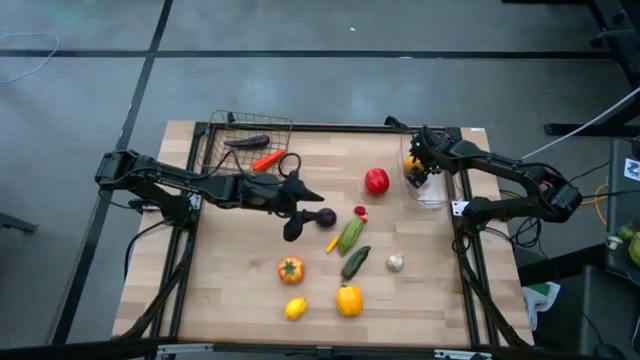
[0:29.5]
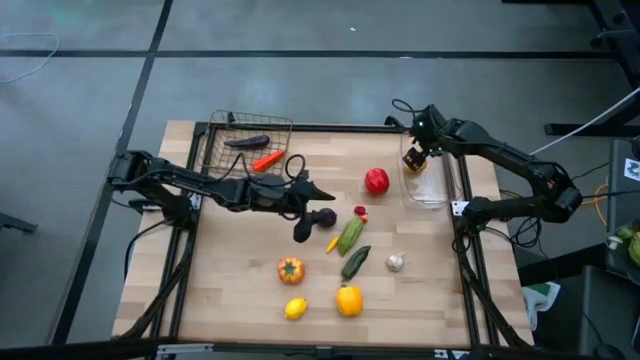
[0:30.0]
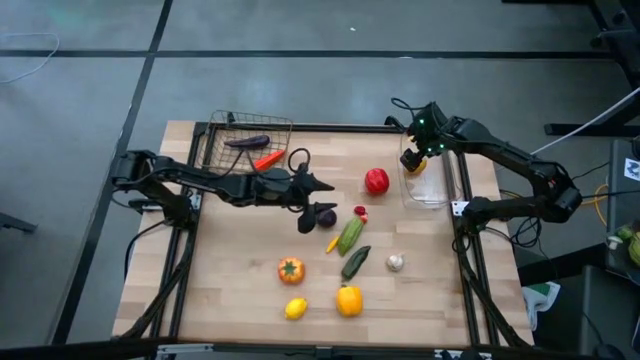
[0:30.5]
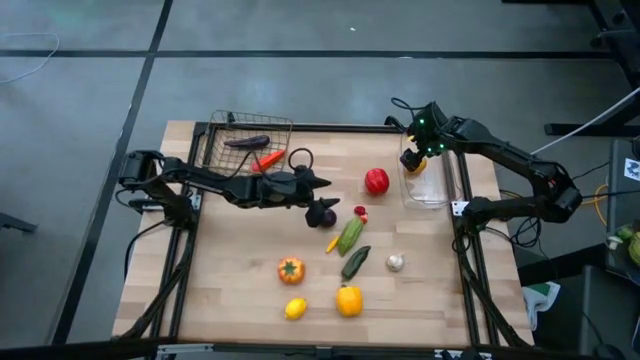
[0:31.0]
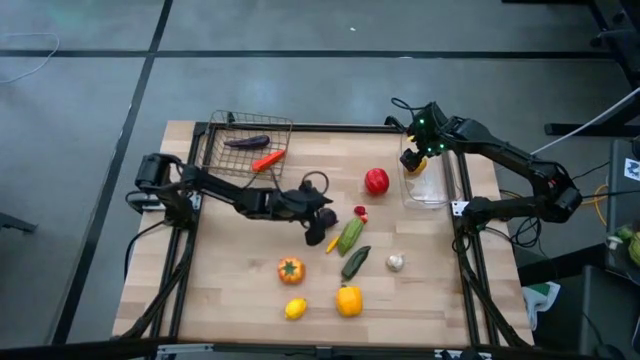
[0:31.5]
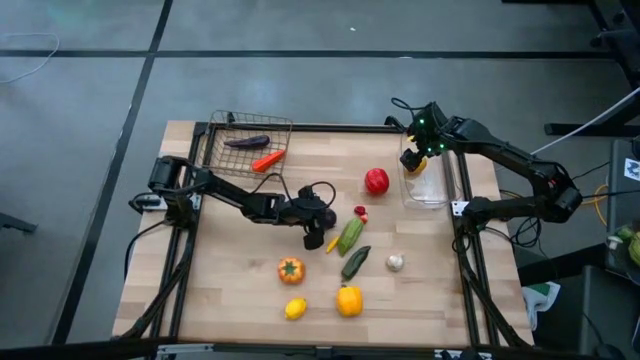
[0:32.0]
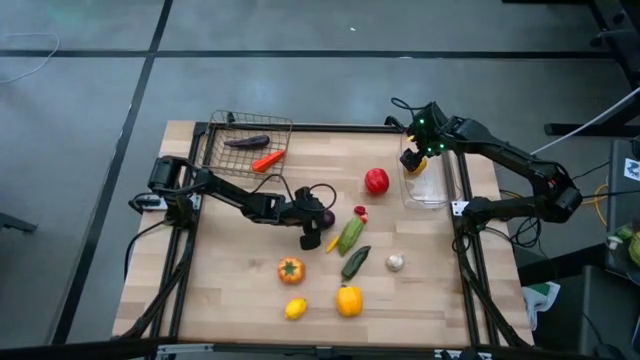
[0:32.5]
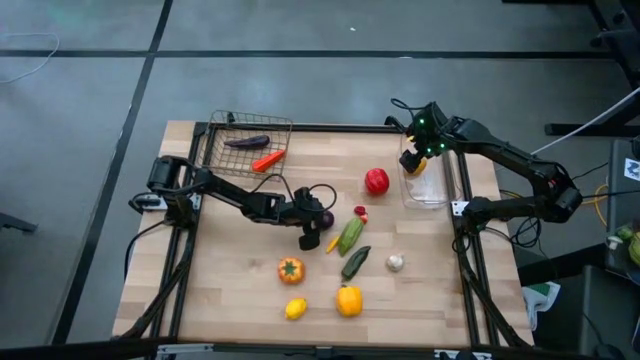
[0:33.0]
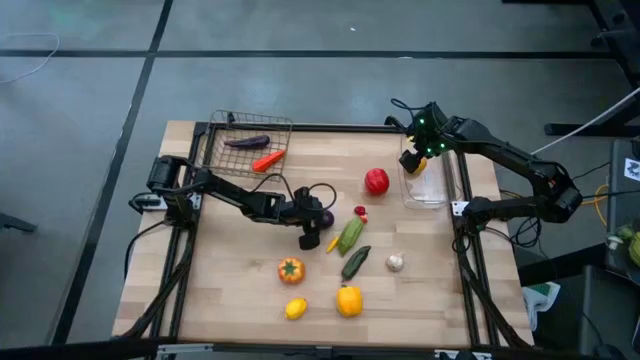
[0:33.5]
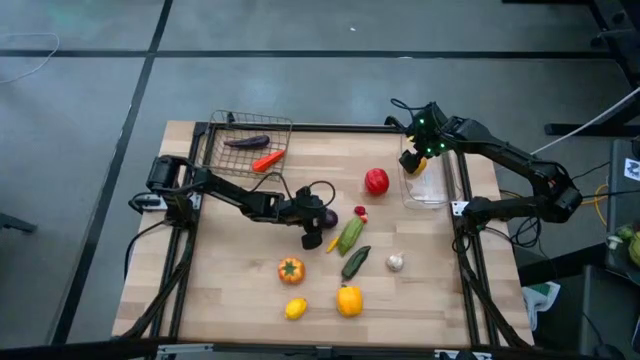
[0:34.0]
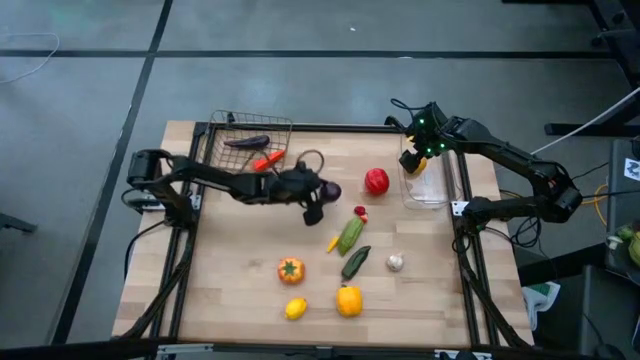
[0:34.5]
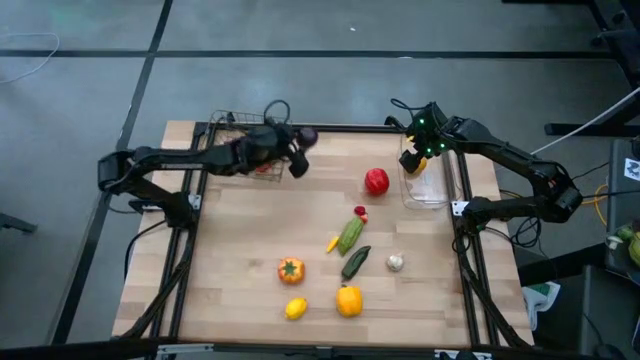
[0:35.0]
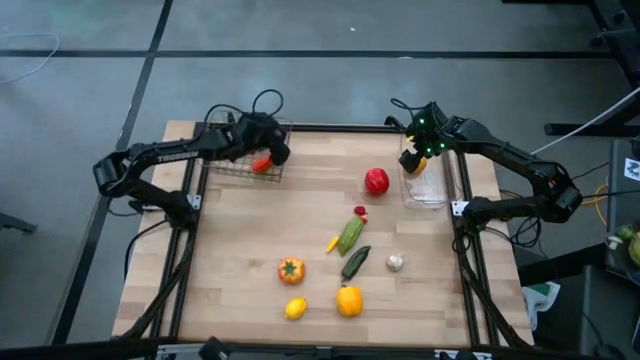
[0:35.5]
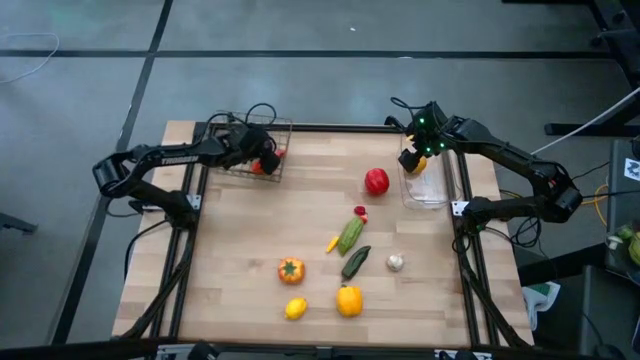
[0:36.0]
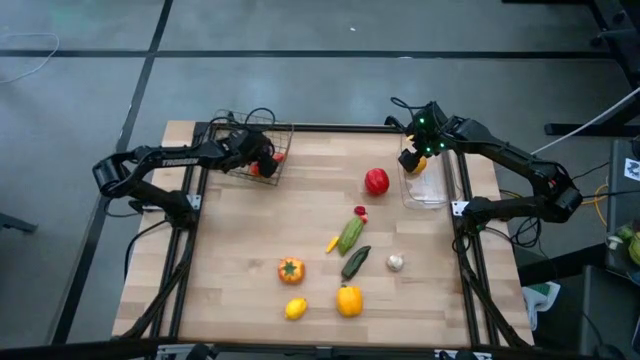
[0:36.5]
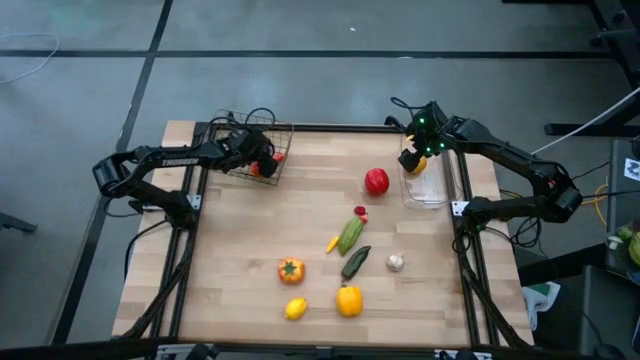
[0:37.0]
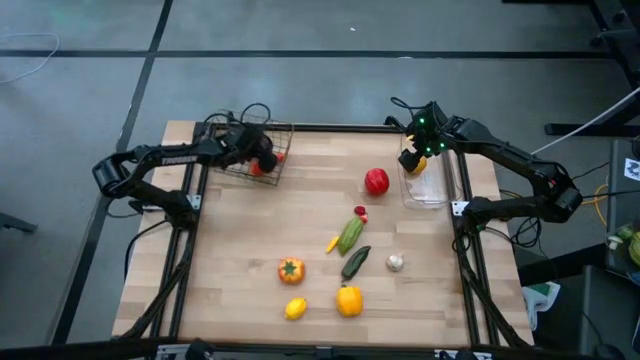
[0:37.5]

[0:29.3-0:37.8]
Task: Sort produce into baskets
Put the violet onion into the silver wire basket

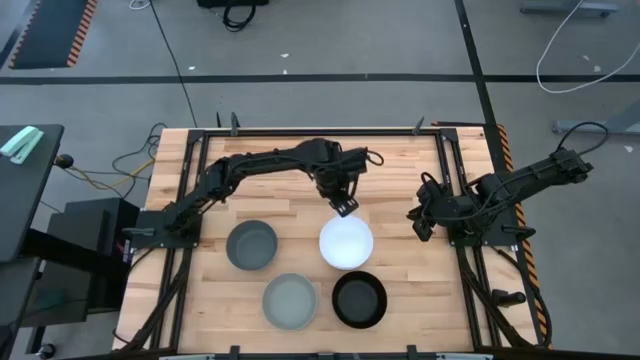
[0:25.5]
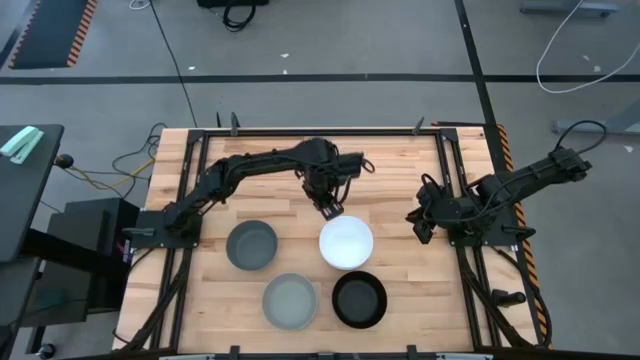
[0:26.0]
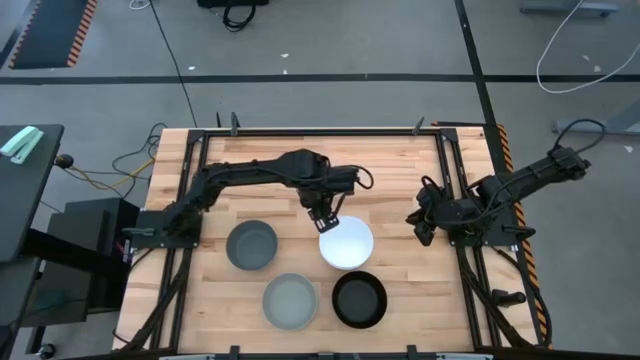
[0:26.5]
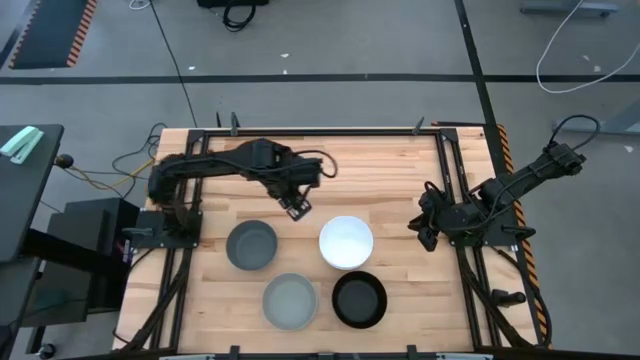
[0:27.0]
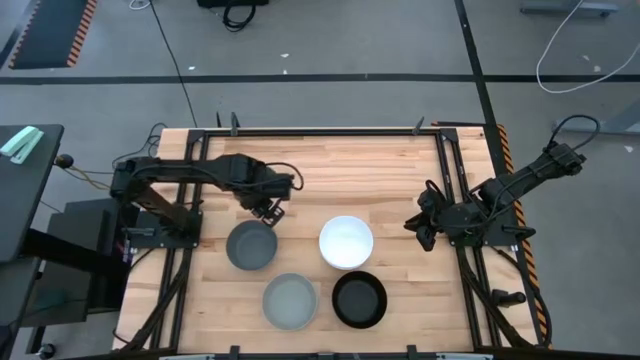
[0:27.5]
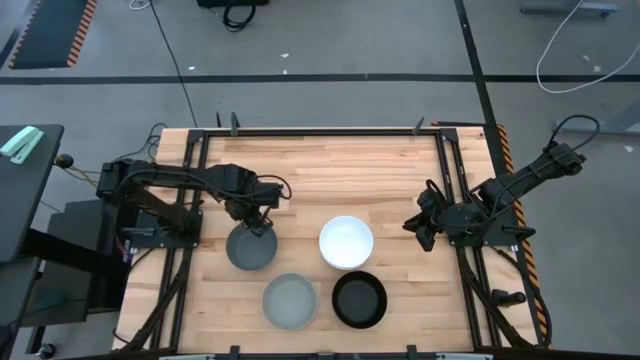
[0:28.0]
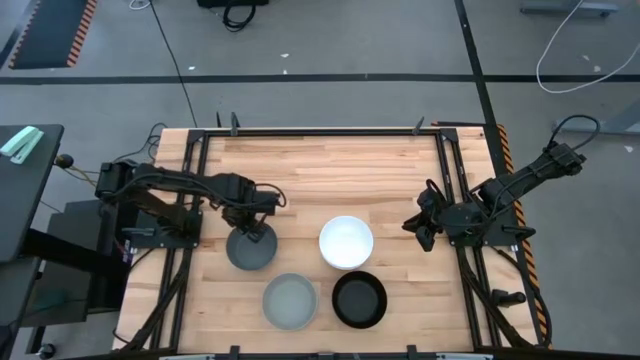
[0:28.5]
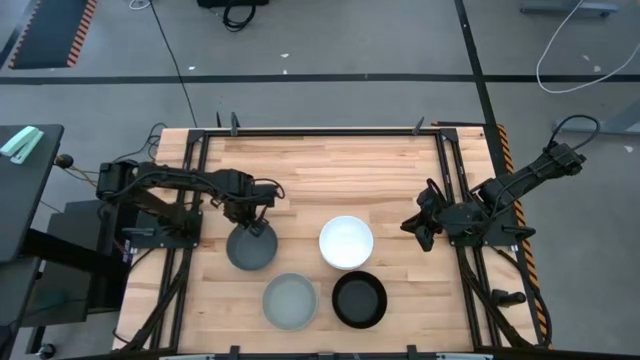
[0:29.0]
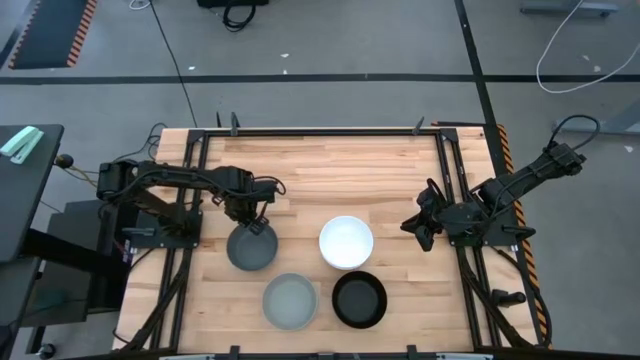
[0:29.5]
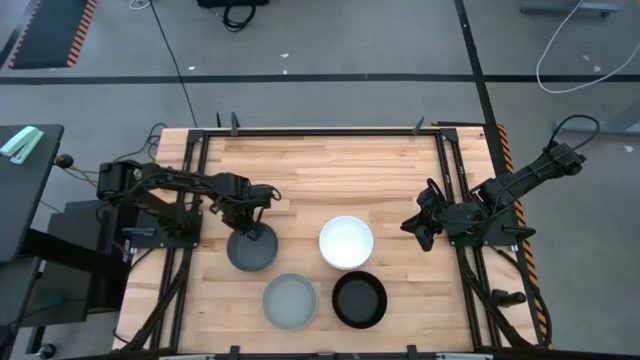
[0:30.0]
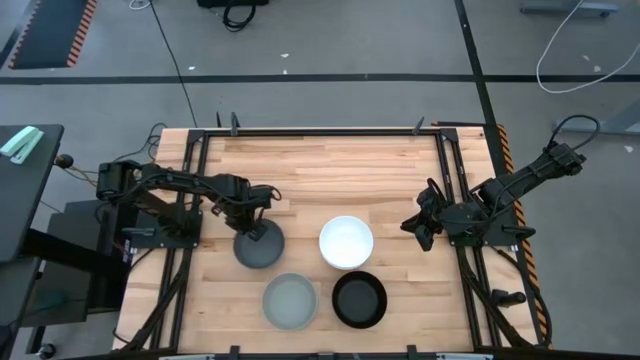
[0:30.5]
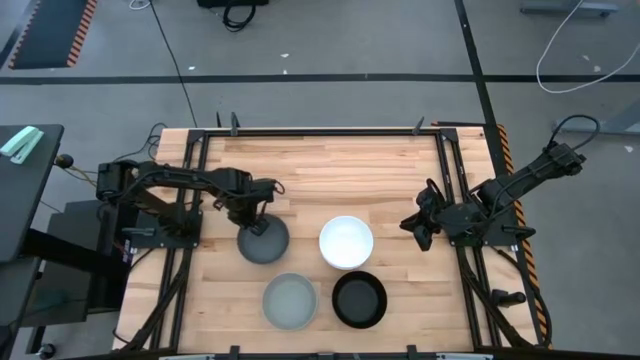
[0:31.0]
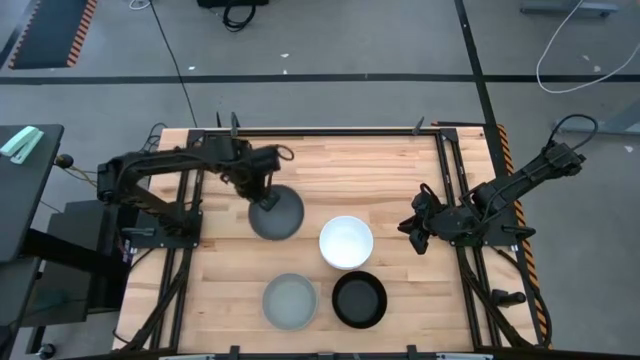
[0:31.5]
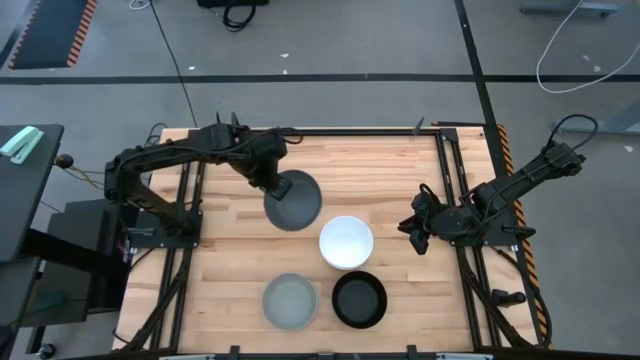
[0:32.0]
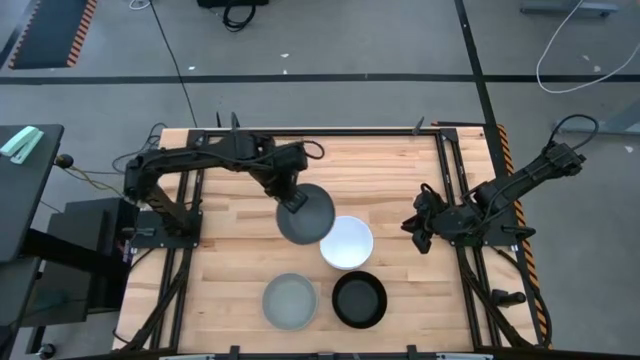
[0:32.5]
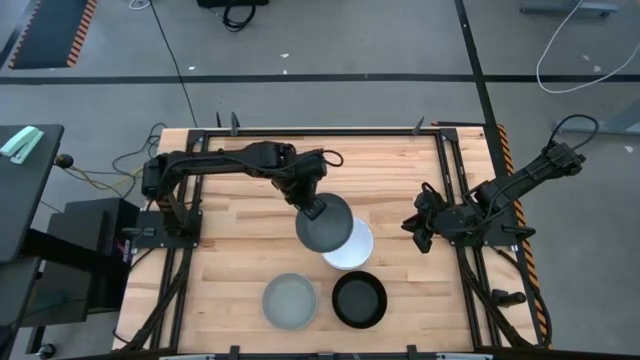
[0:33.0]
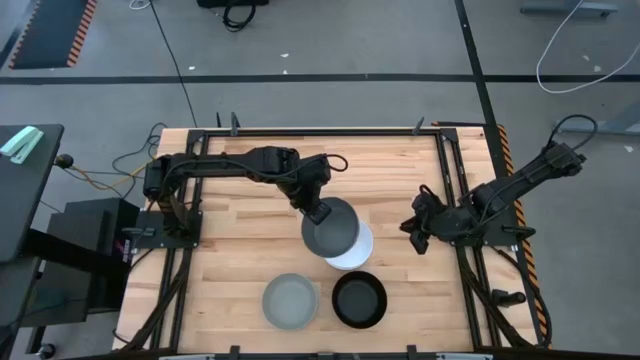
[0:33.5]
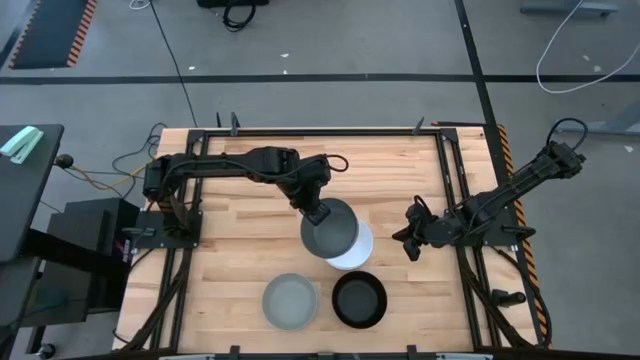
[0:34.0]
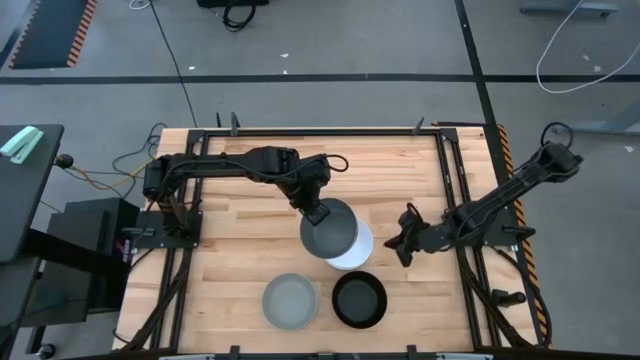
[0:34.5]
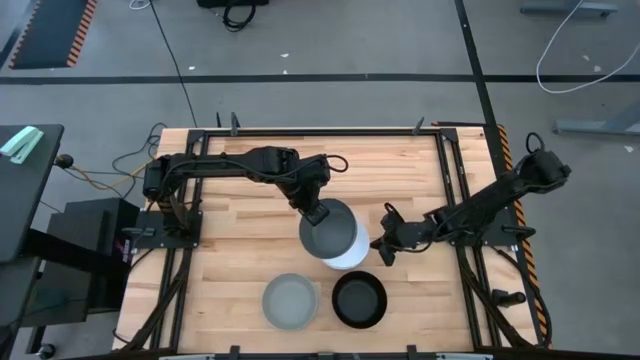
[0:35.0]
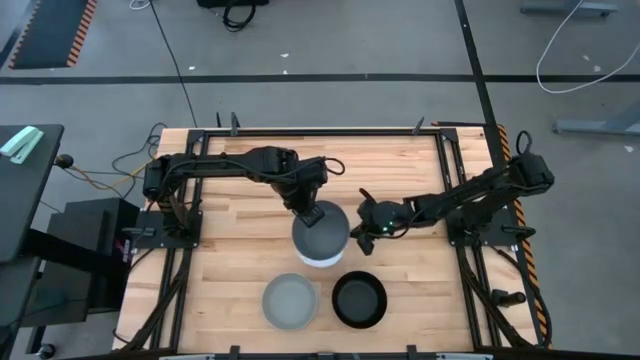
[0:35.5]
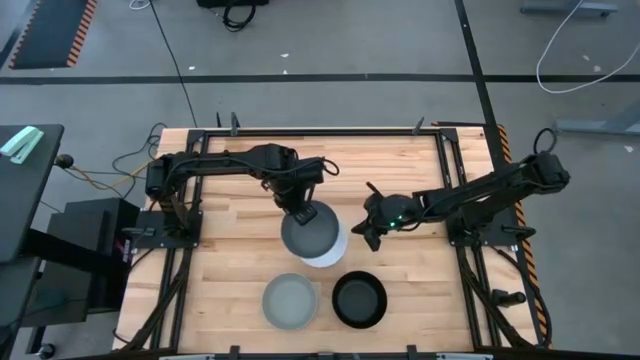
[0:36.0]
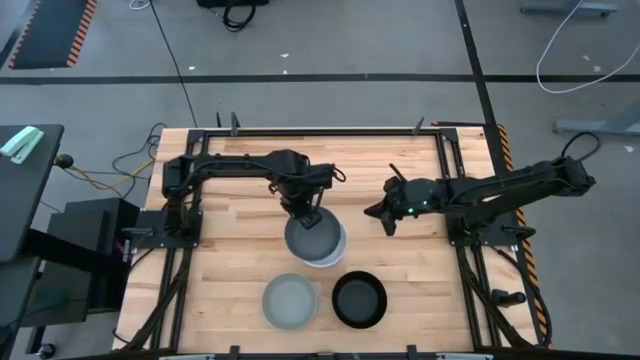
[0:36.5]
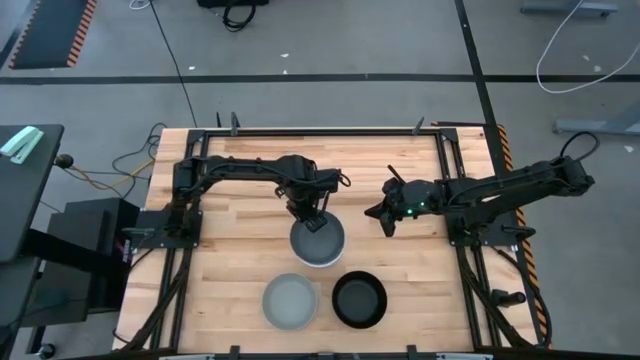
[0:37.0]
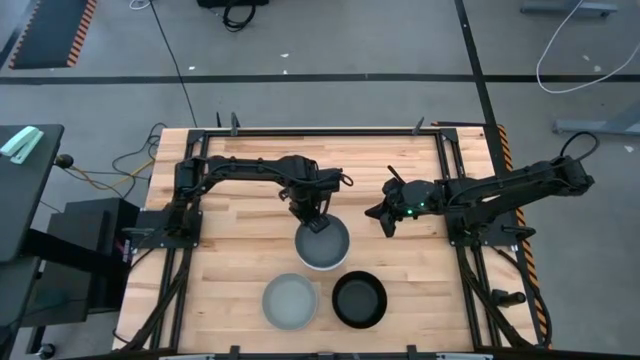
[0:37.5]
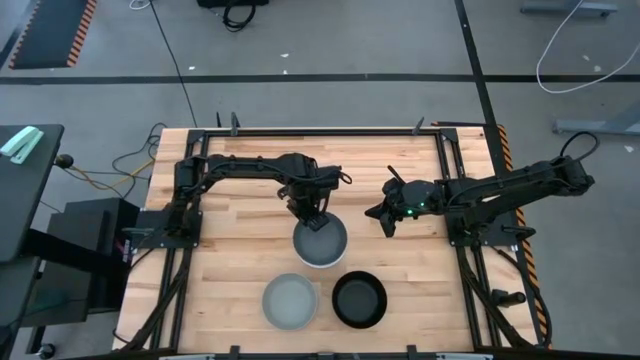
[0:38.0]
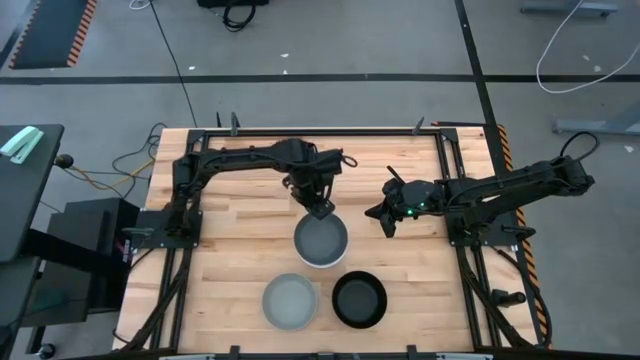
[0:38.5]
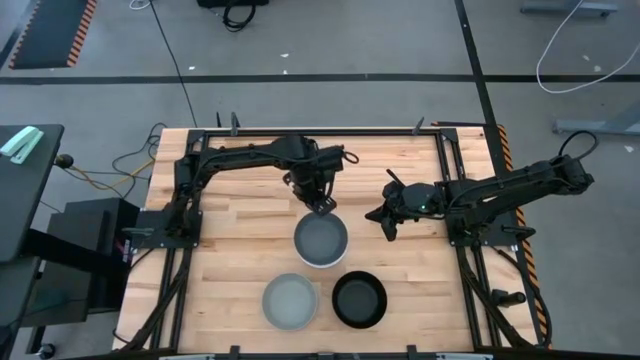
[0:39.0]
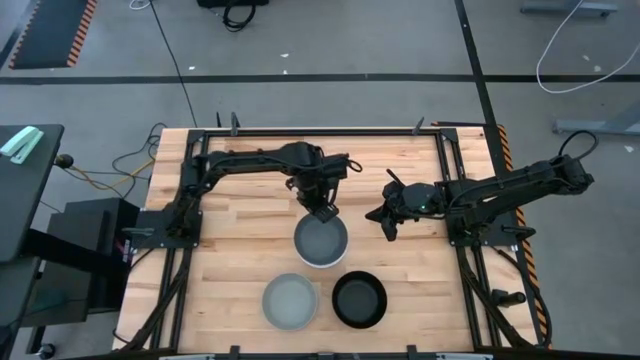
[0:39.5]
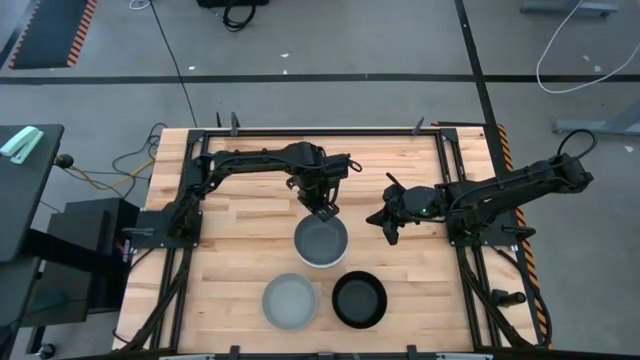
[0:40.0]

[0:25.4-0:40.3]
Task: Nest bowls inside each other
Stack the dark gray bowl on top of the white bowl
